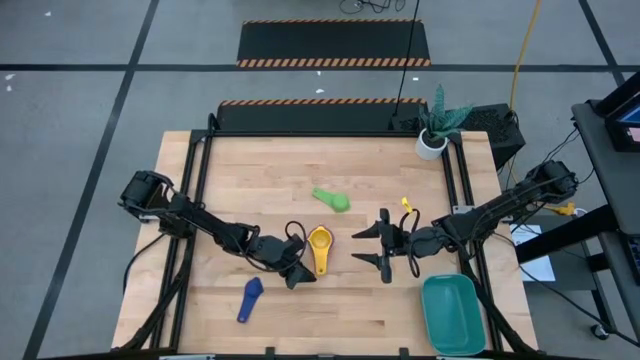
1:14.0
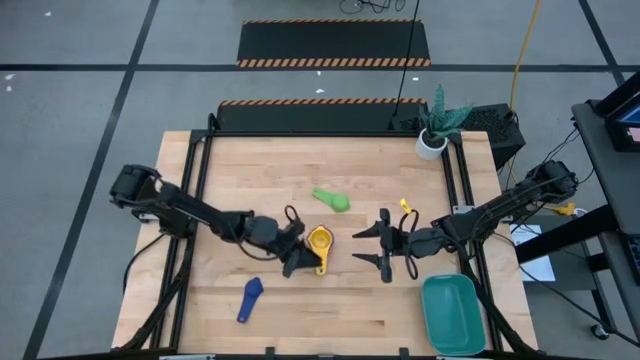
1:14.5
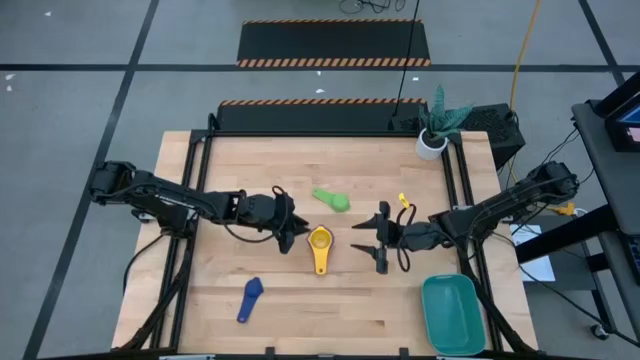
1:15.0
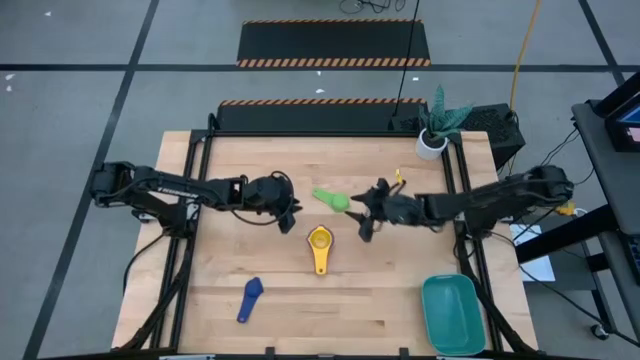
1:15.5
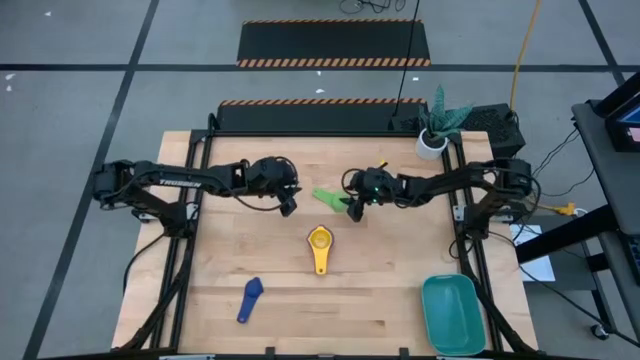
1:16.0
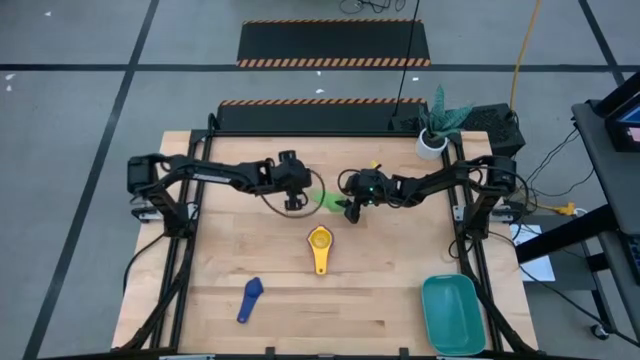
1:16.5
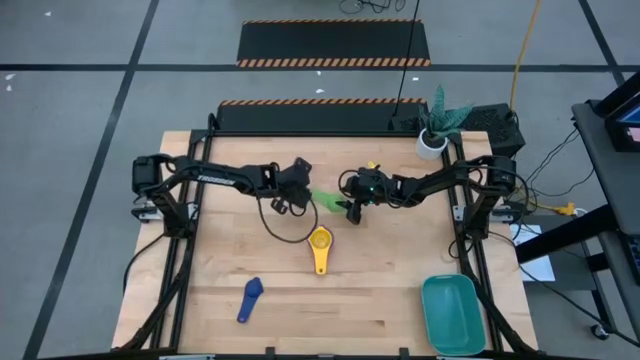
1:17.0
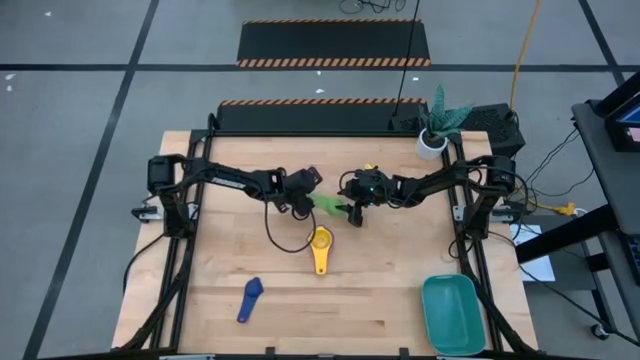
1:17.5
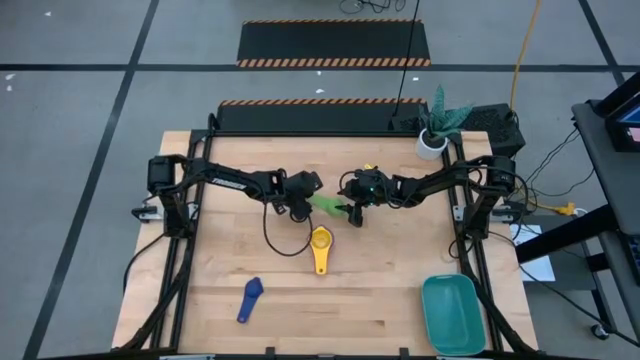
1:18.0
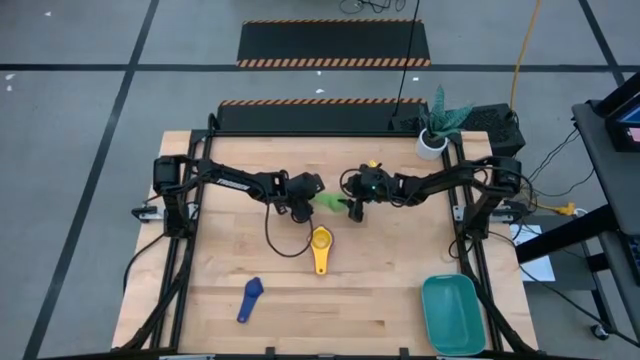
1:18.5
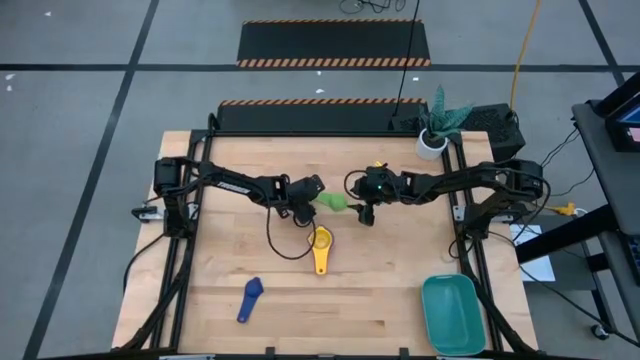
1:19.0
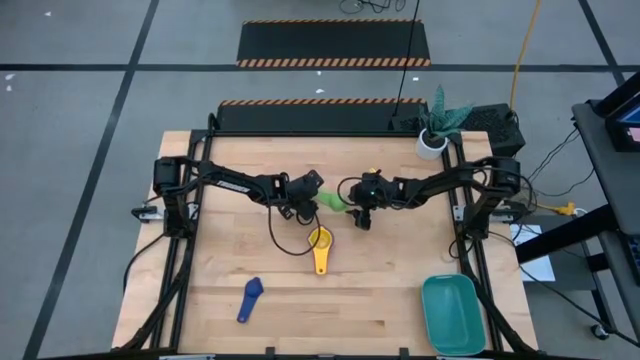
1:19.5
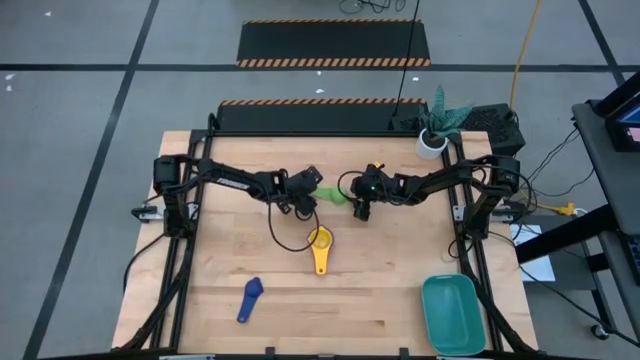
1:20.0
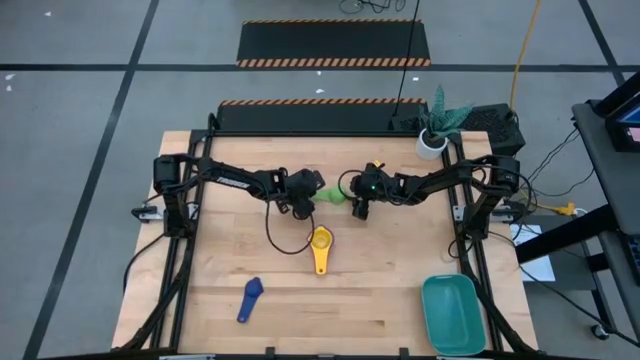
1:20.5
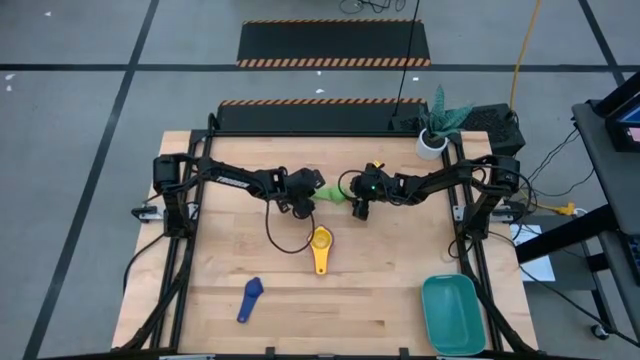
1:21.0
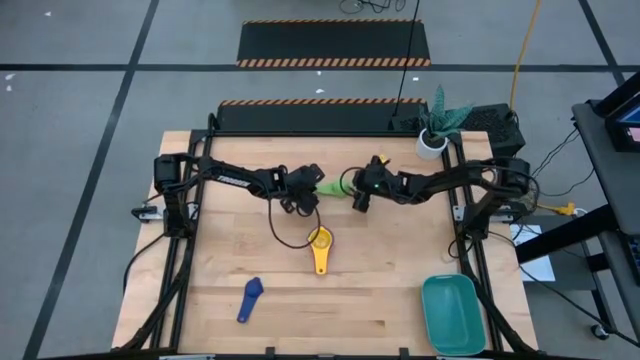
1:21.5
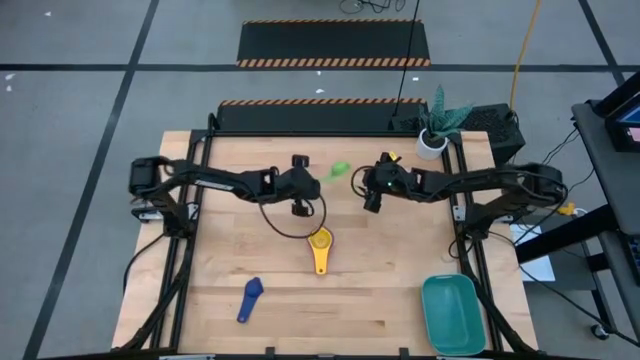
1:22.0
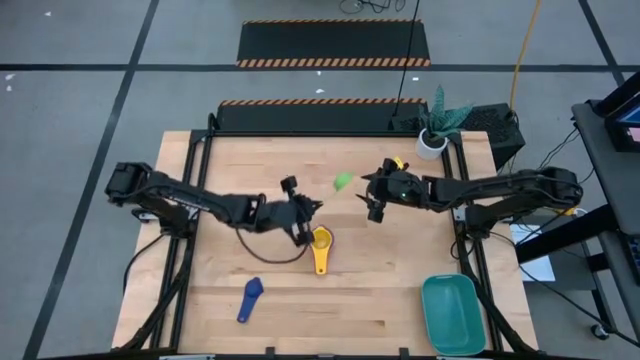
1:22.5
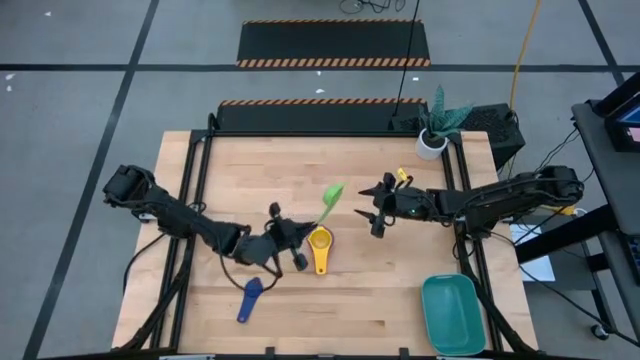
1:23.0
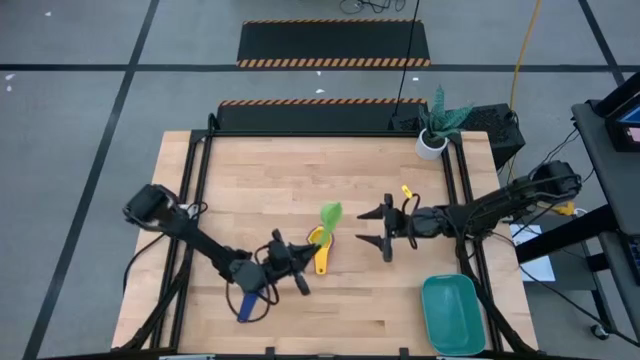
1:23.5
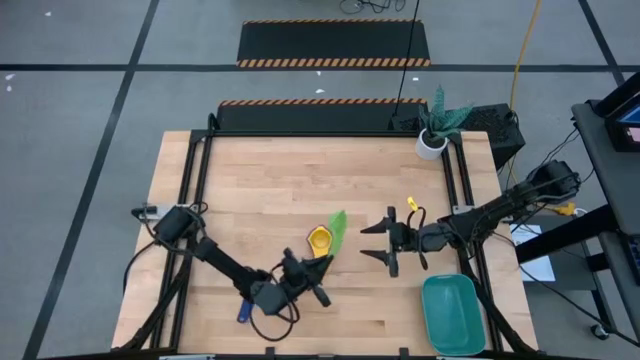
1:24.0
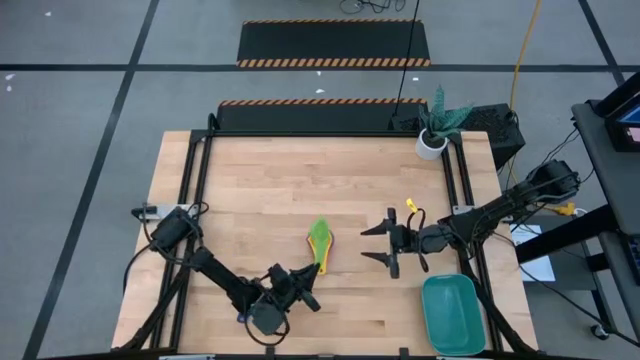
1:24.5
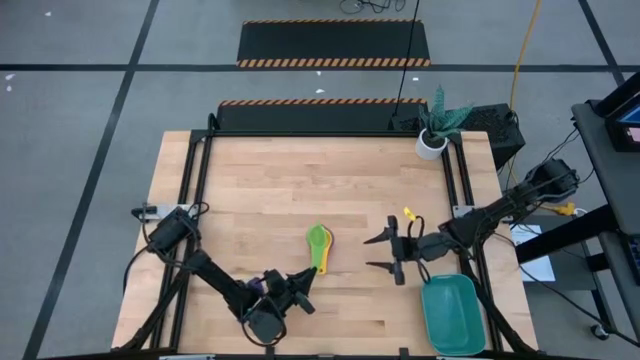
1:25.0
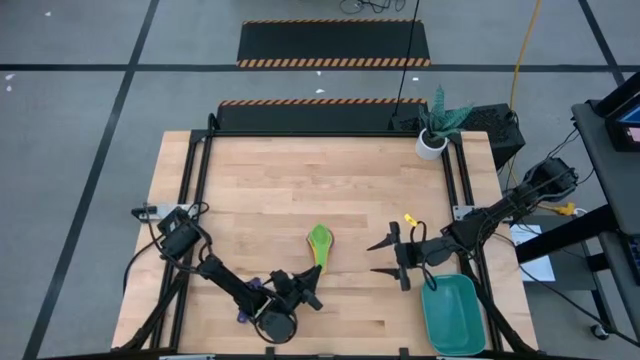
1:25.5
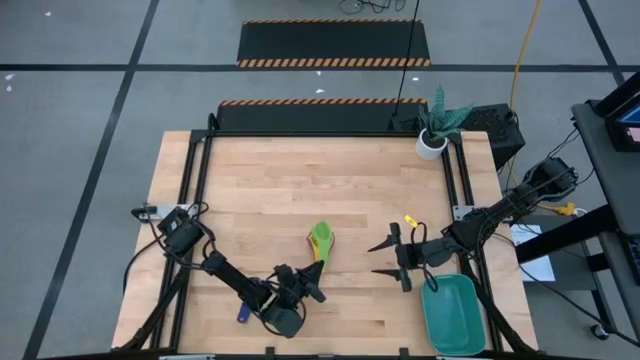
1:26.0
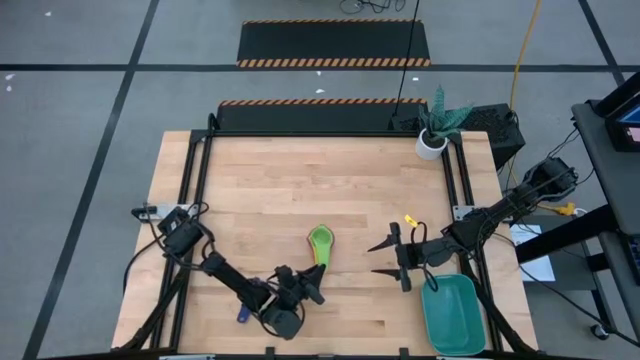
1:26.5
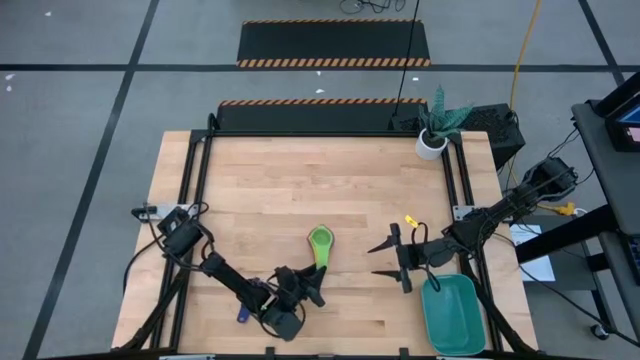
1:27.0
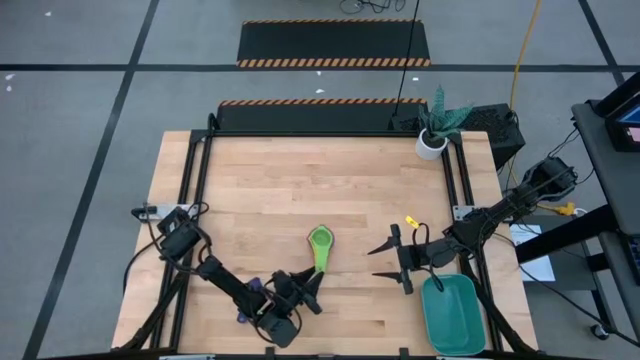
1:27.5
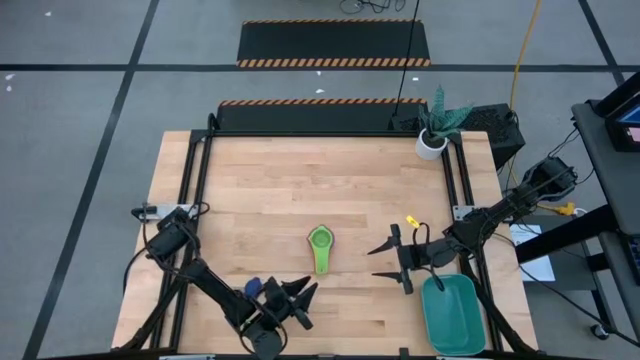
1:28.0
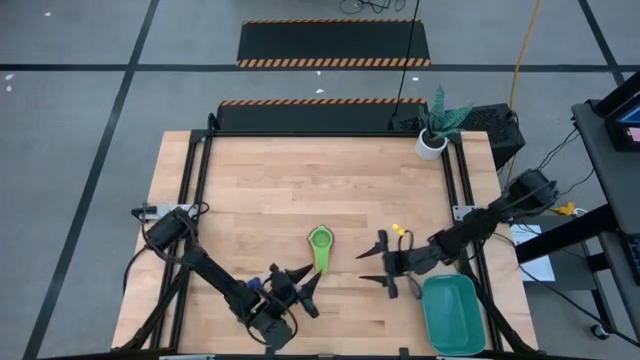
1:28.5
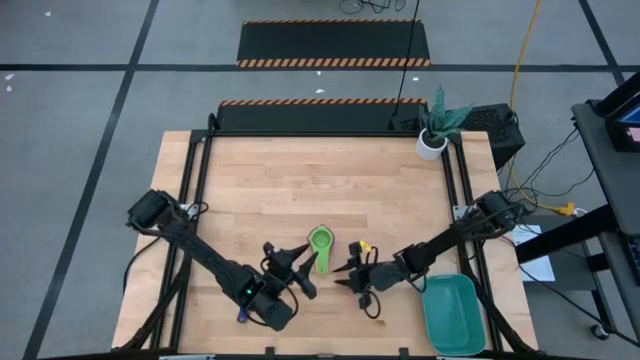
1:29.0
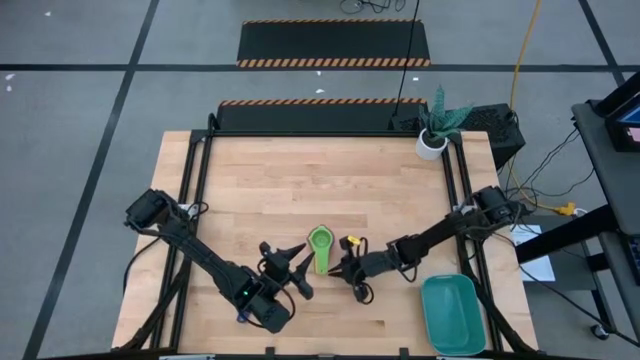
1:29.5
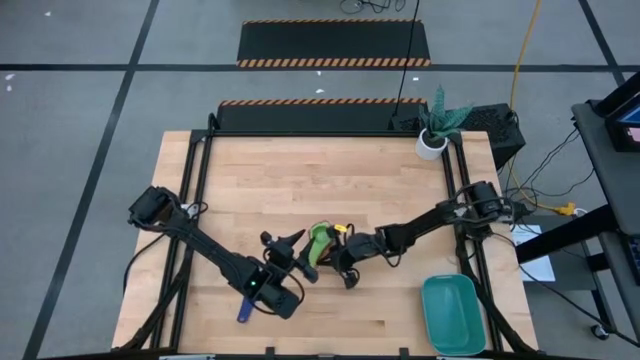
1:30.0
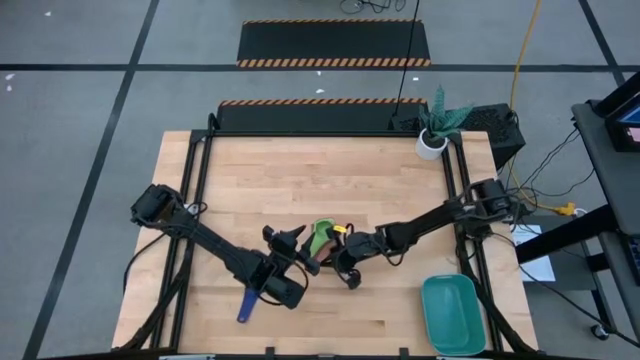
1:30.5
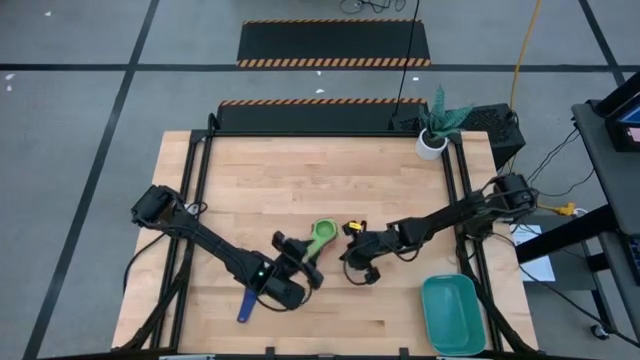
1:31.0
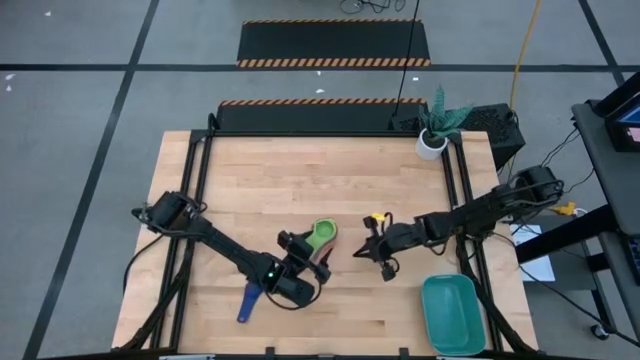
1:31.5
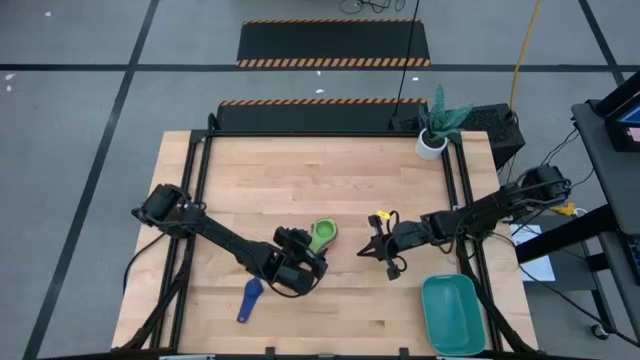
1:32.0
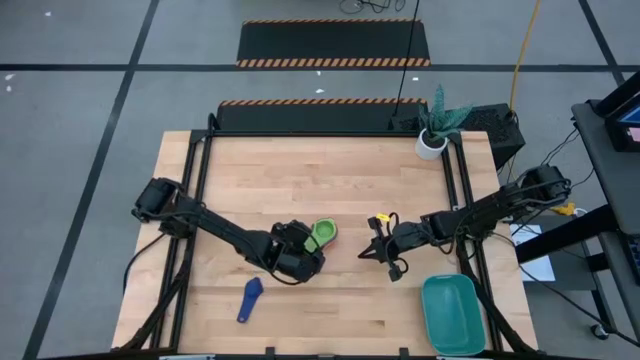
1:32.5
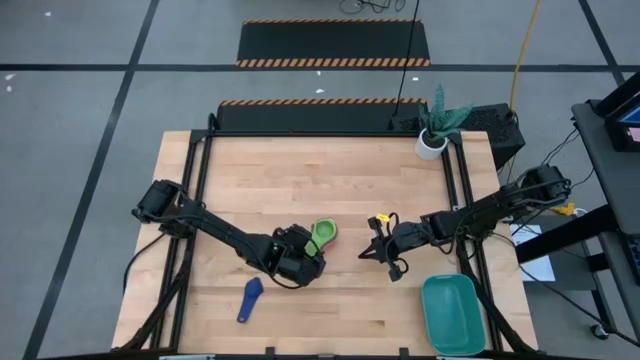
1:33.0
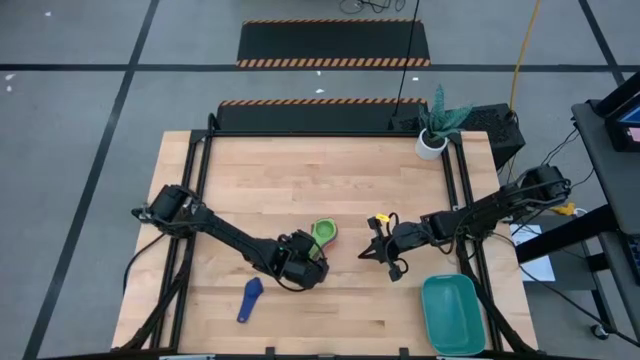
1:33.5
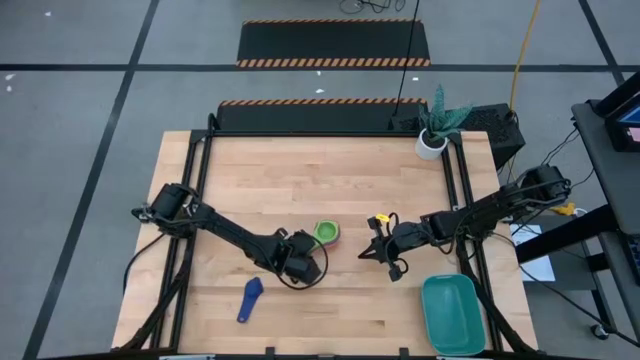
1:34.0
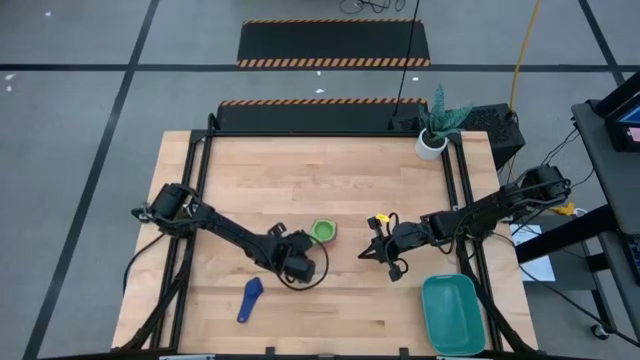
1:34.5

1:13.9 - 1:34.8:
Task: Nest measuring cups in basket
Stack the green measuring cup on top of the yellow measuring cup
